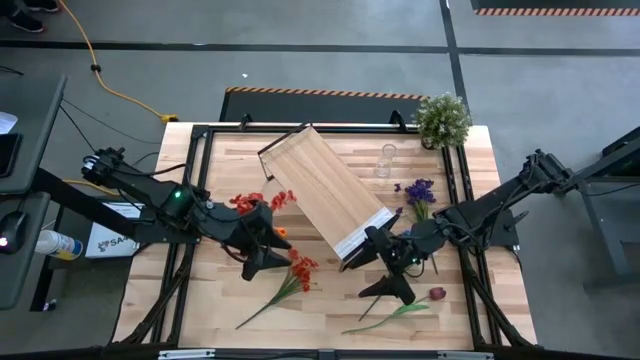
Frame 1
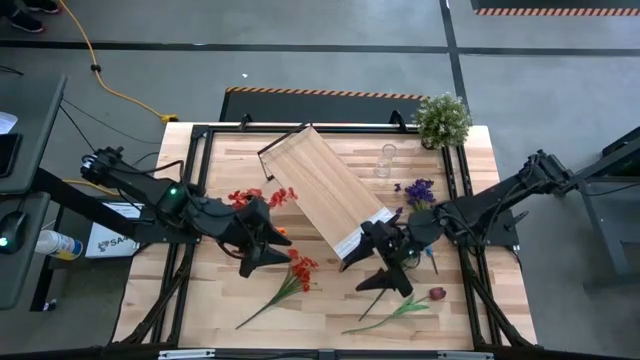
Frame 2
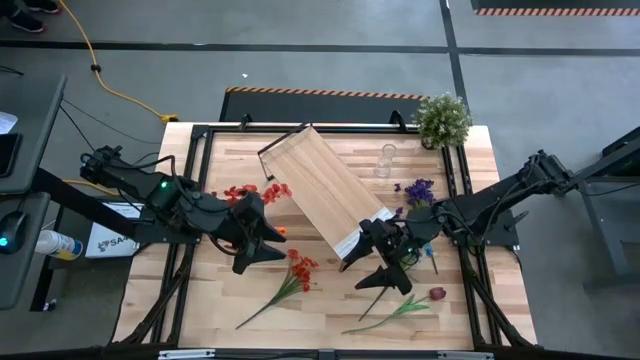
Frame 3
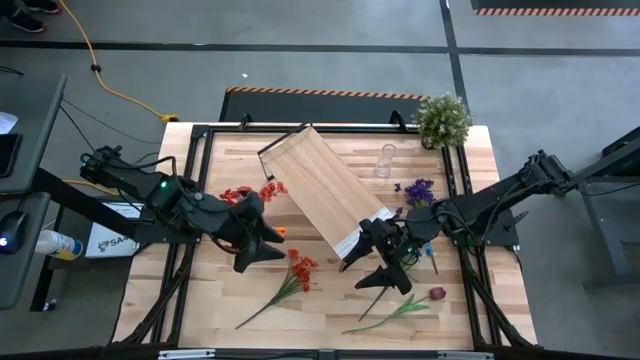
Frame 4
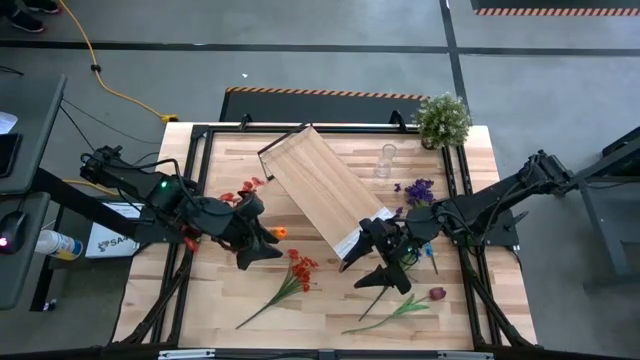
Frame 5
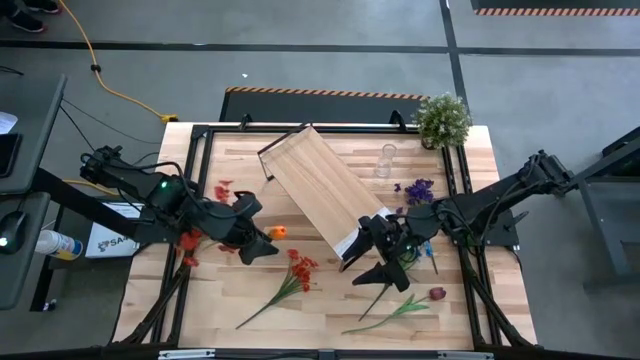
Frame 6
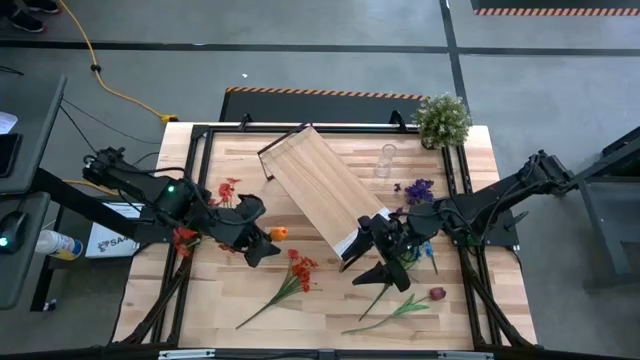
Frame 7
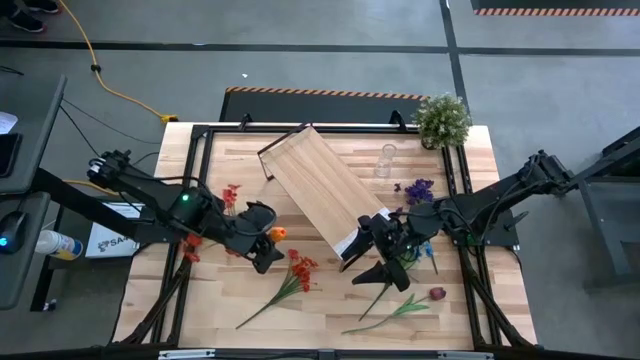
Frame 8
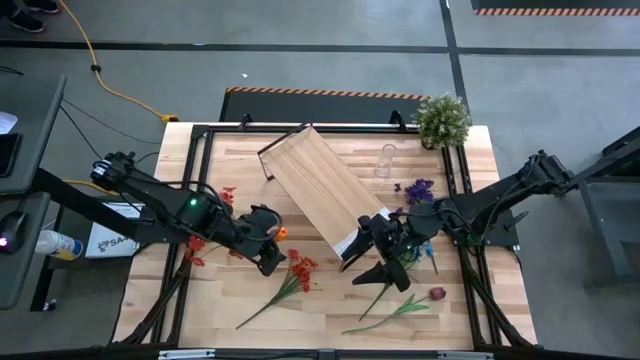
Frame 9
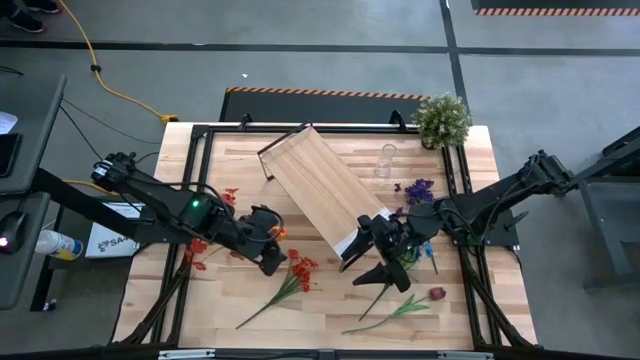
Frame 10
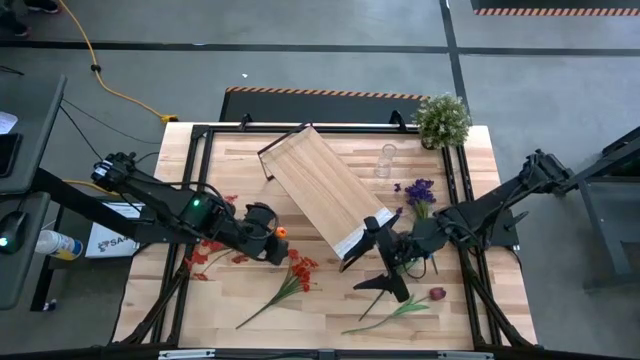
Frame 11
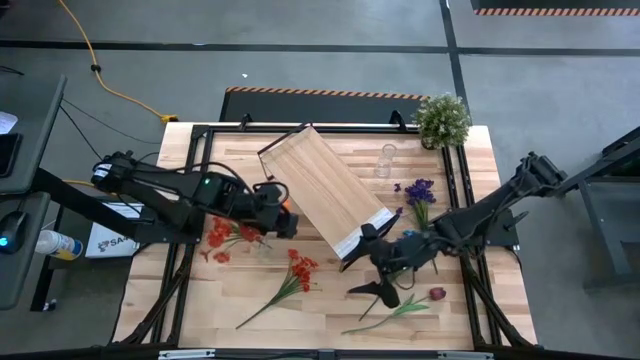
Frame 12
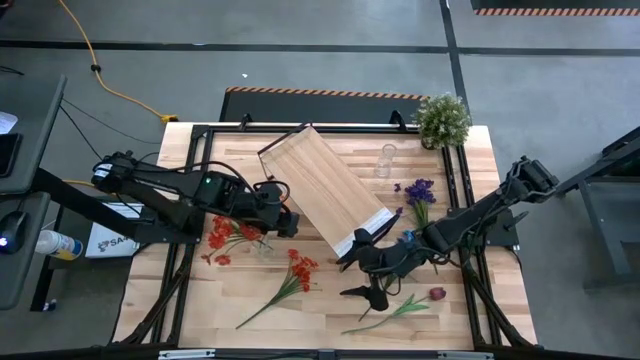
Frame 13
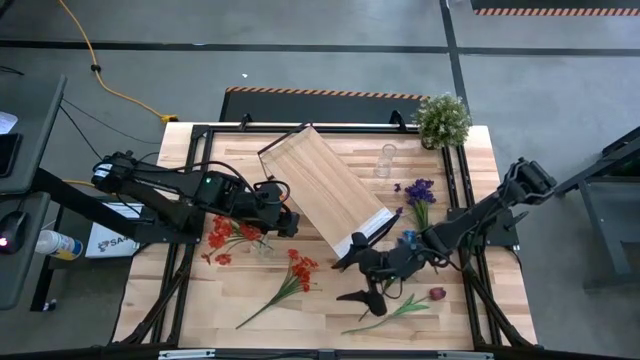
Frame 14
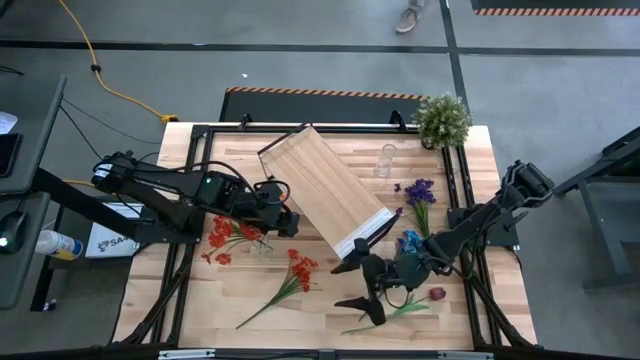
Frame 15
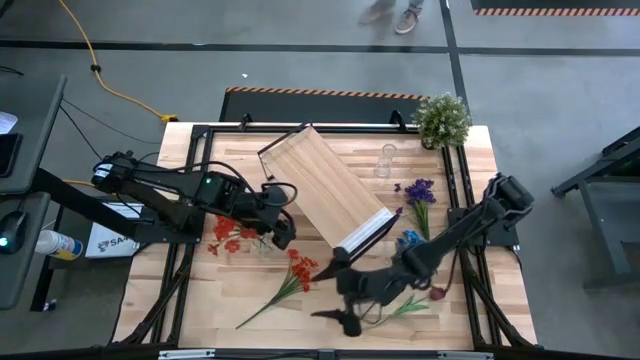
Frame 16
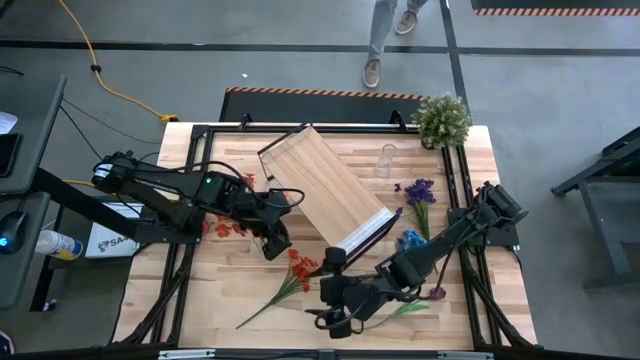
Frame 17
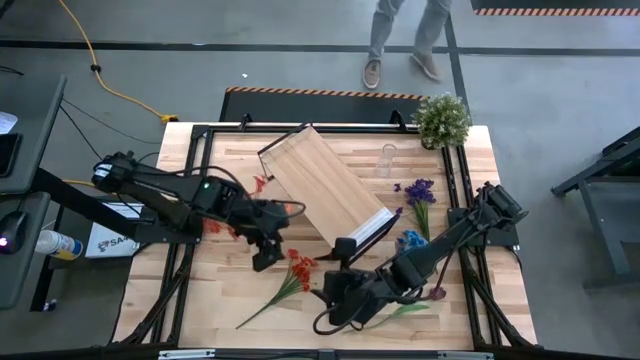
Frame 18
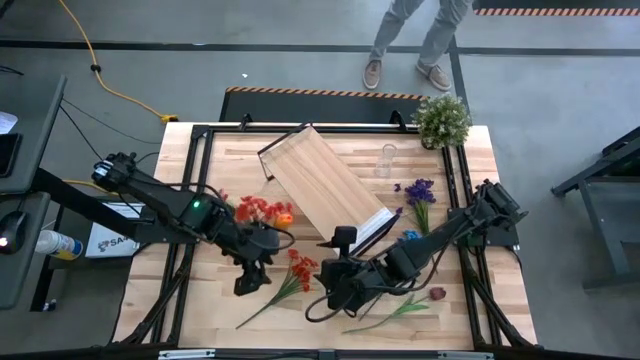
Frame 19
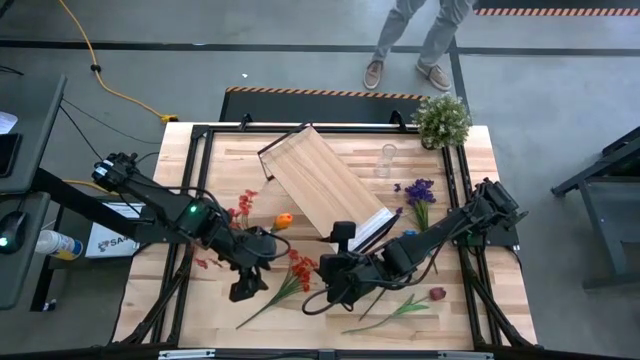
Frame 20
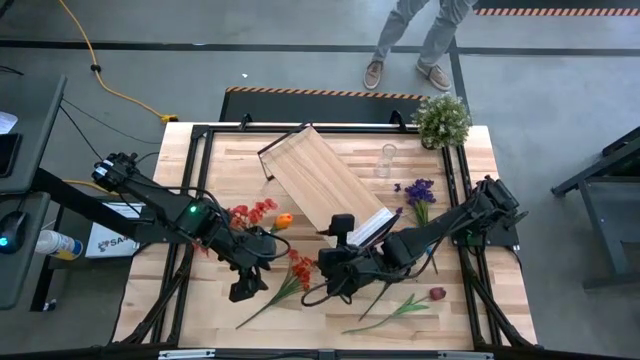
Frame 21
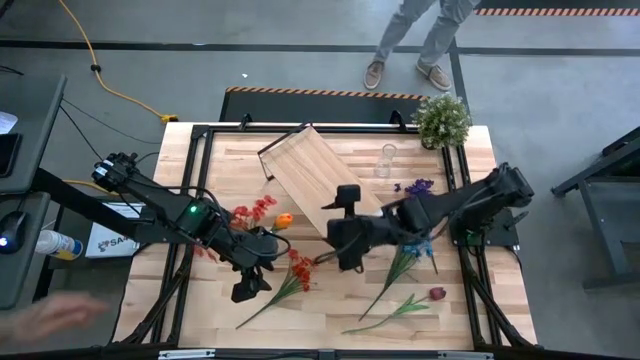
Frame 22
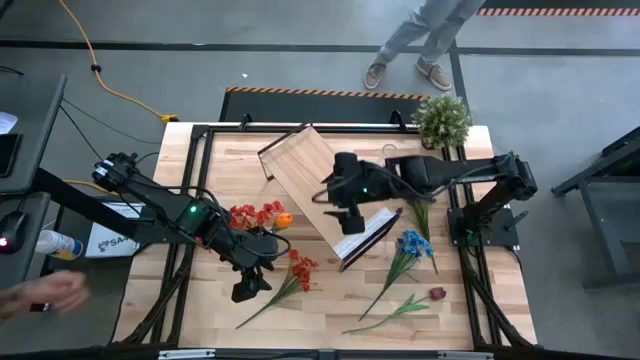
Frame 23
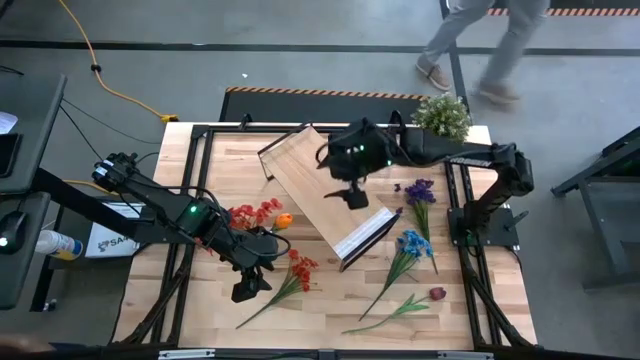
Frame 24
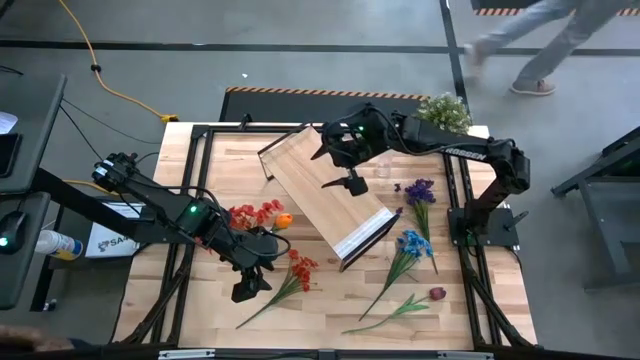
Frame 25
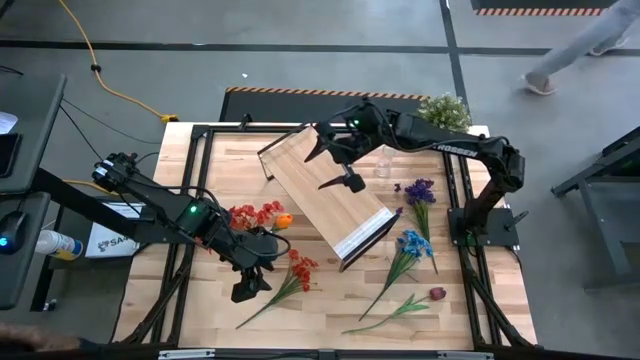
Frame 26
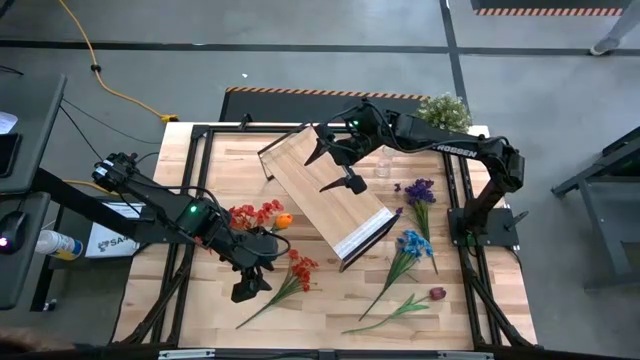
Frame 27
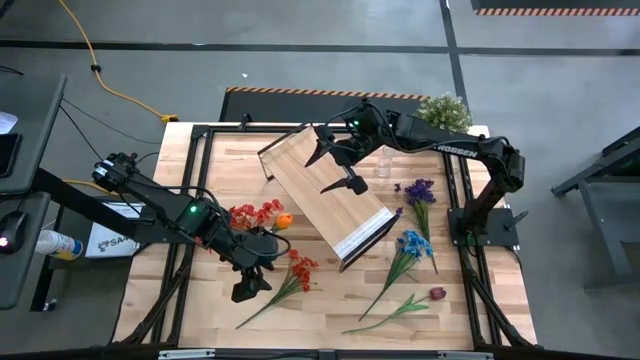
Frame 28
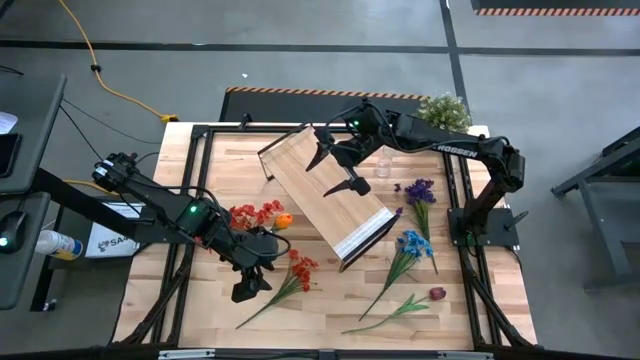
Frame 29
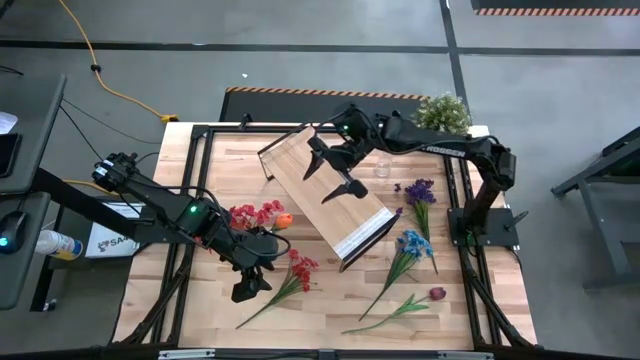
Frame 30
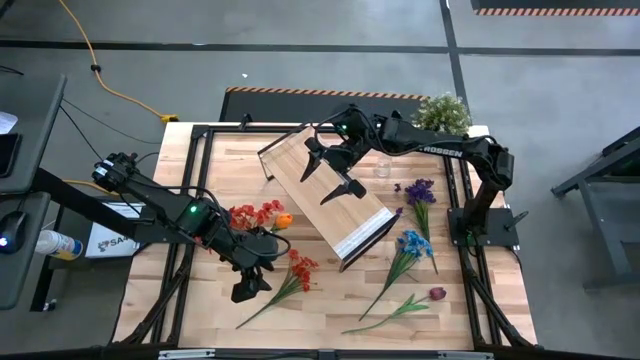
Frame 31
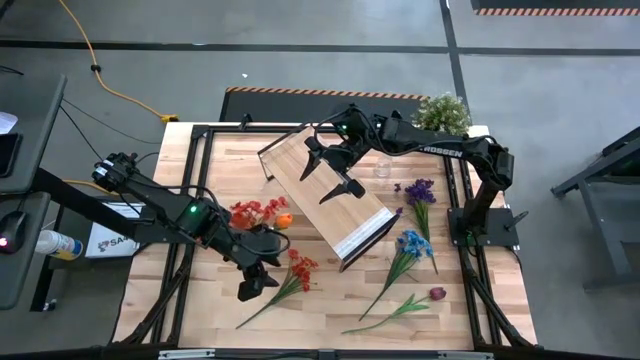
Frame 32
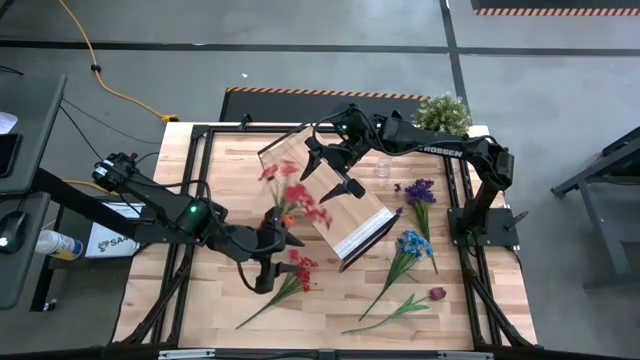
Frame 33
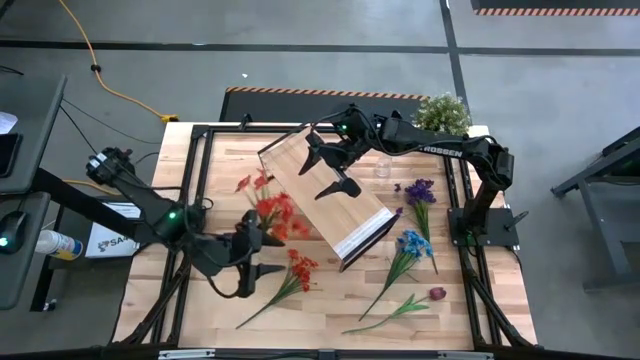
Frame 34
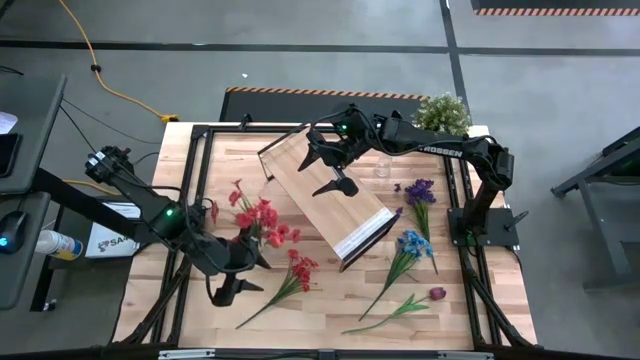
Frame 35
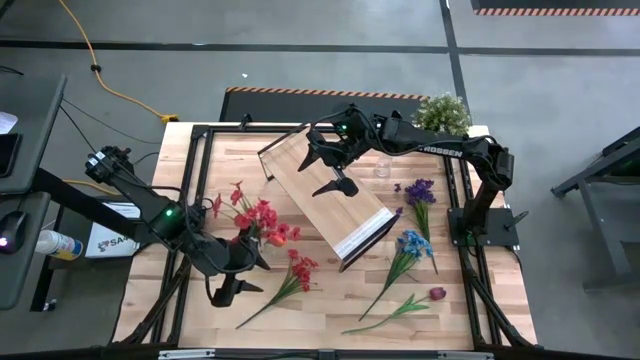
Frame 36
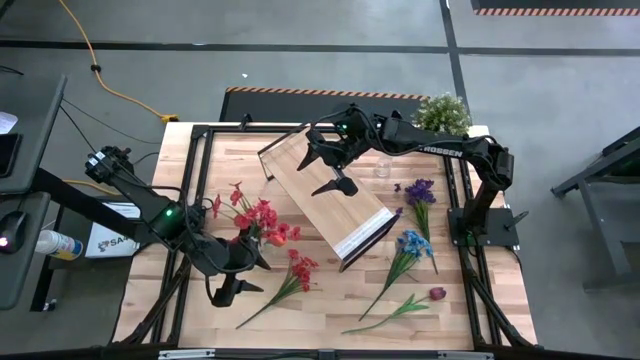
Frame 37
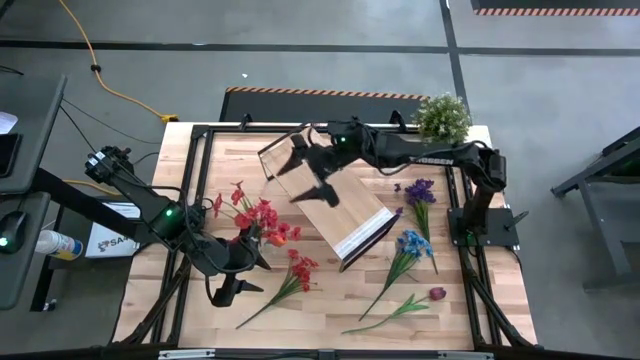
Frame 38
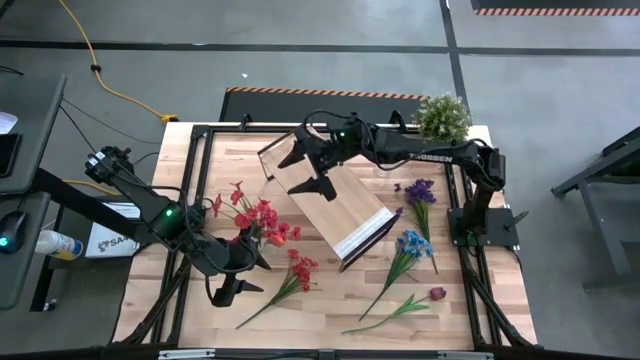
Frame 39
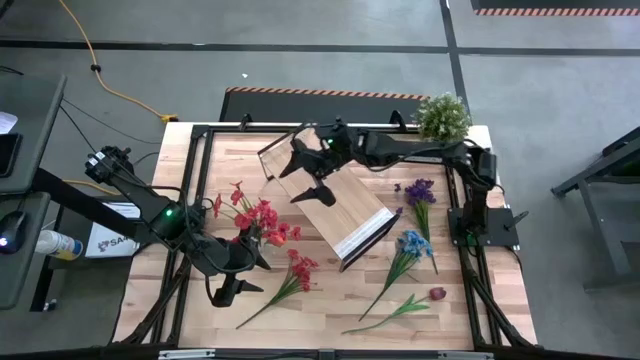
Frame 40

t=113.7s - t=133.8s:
Task: Pick and place flowers into a vace then onto a shelf
Put the red flowers into the bottom transparent vase

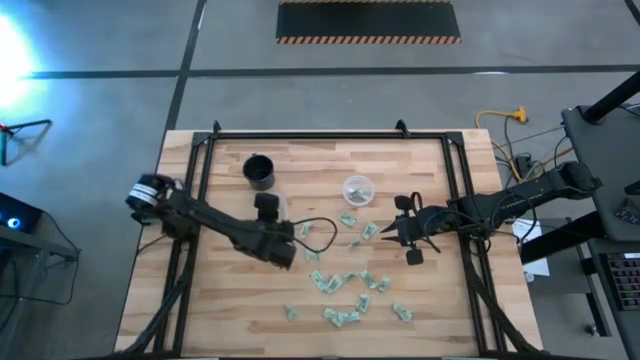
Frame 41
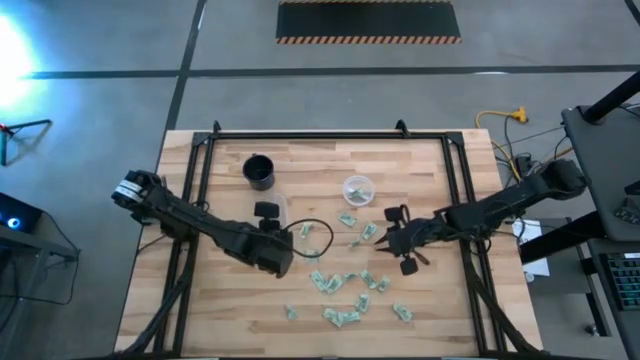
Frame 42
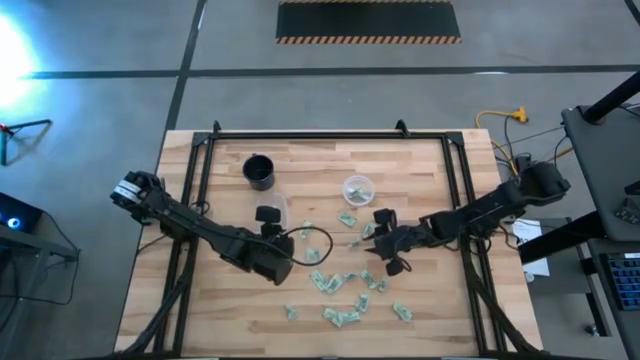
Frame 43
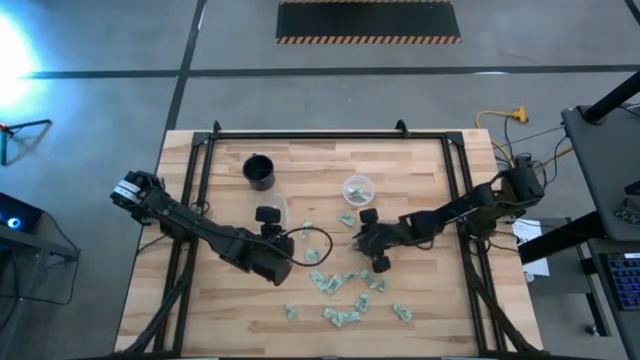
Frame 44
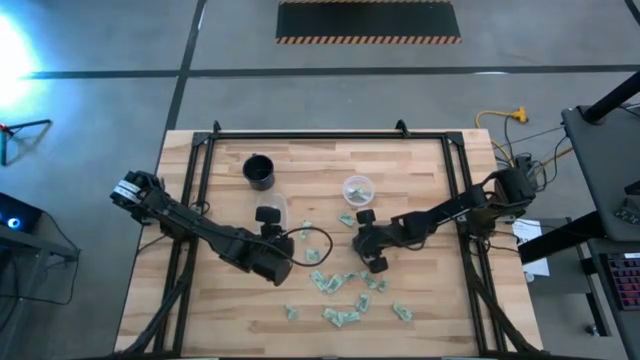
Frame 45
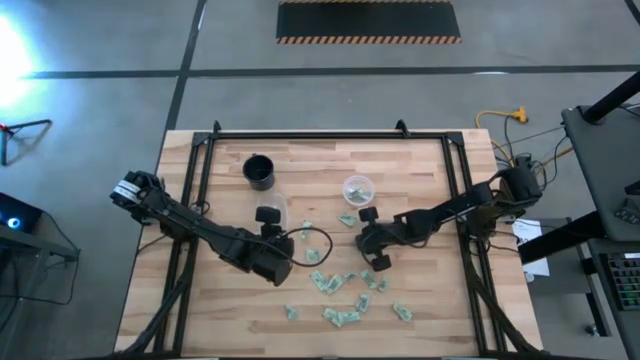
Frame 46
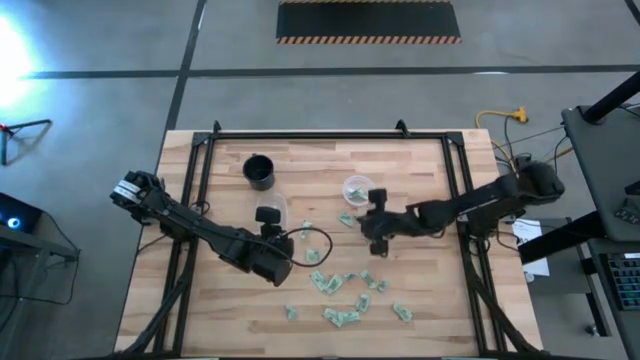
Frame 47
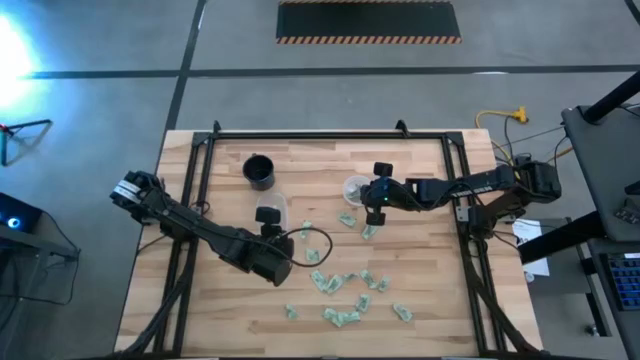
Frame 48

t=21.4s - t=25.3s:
Task: Pick and place items into bin
Put the stevia packet into the right transparent bin
